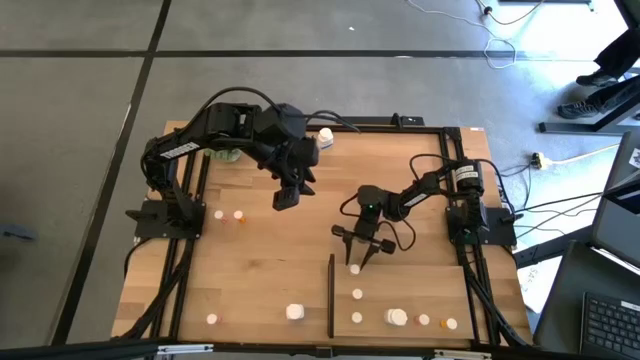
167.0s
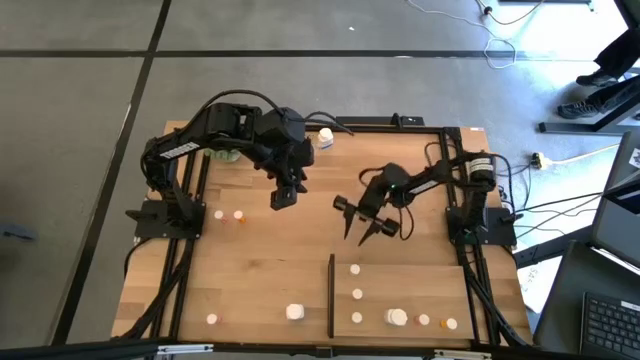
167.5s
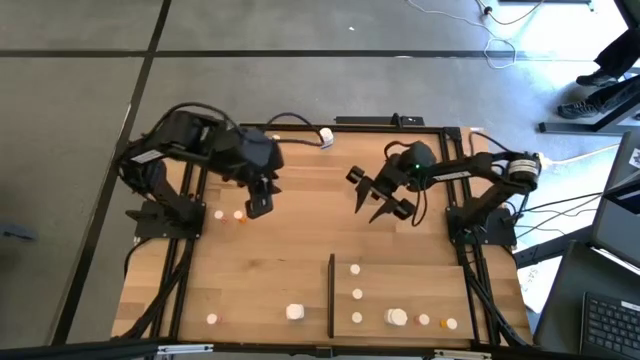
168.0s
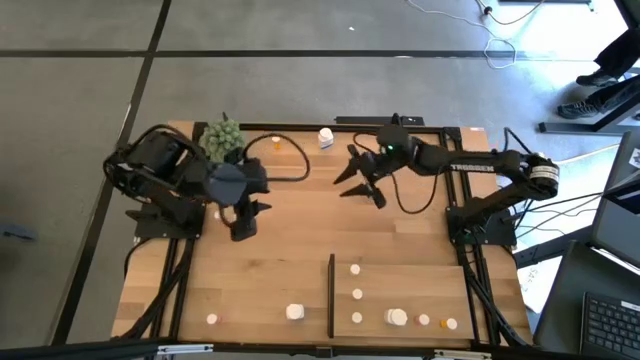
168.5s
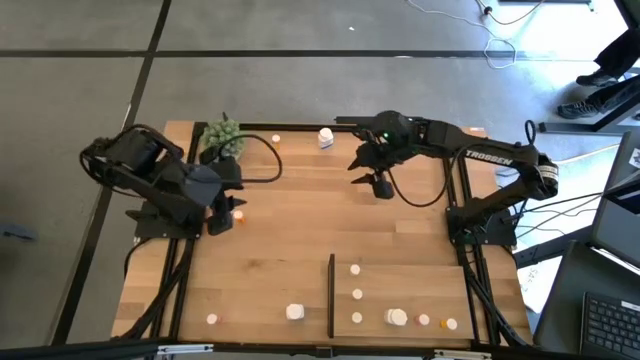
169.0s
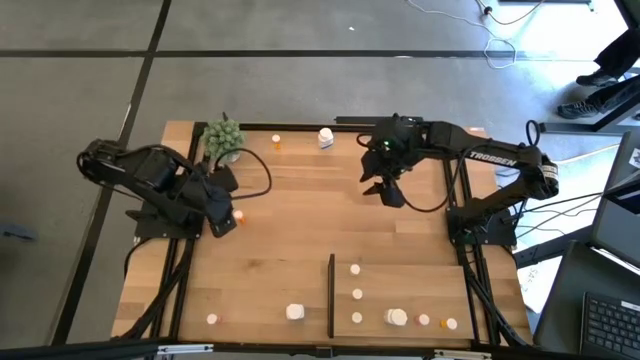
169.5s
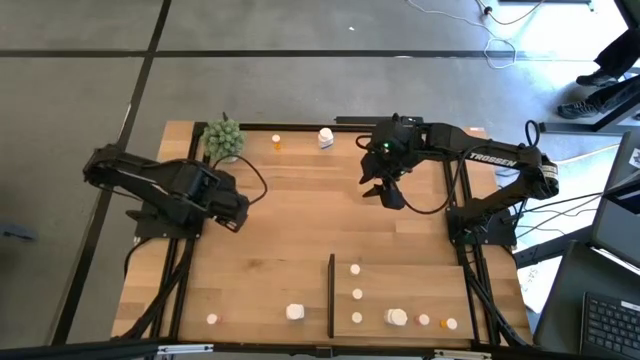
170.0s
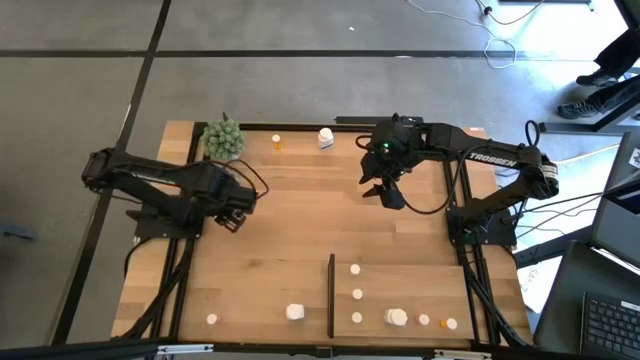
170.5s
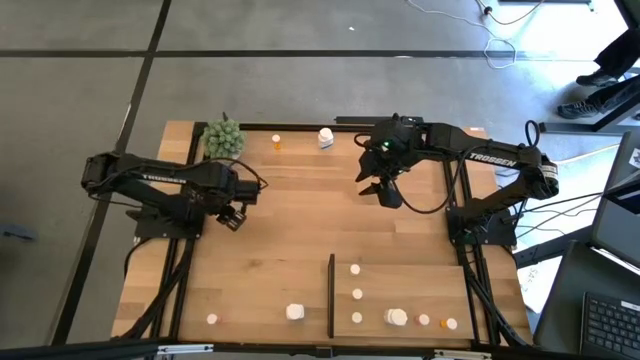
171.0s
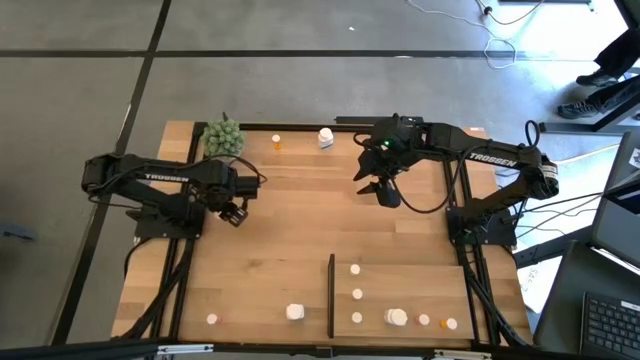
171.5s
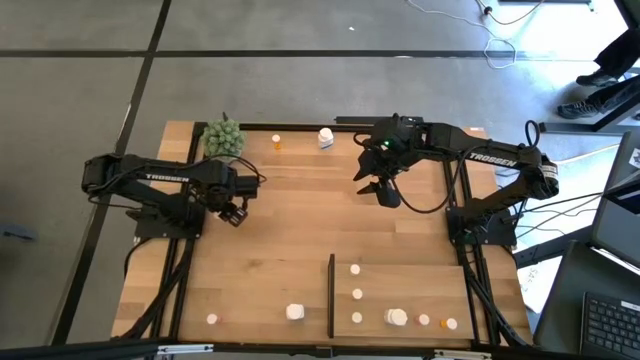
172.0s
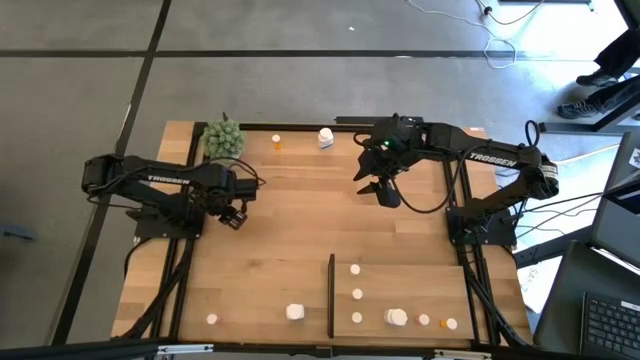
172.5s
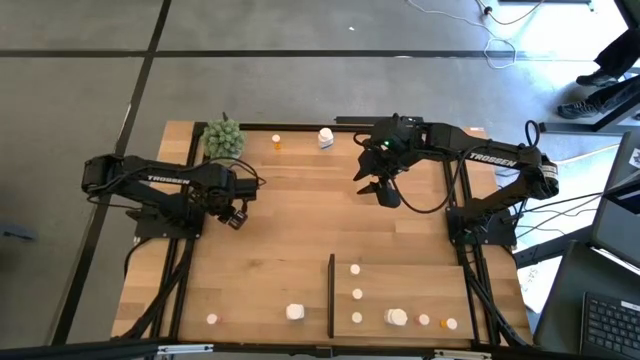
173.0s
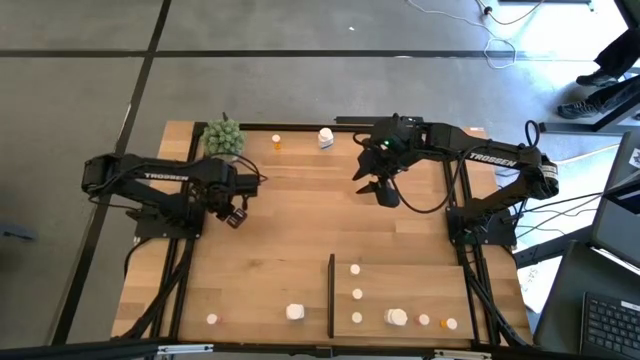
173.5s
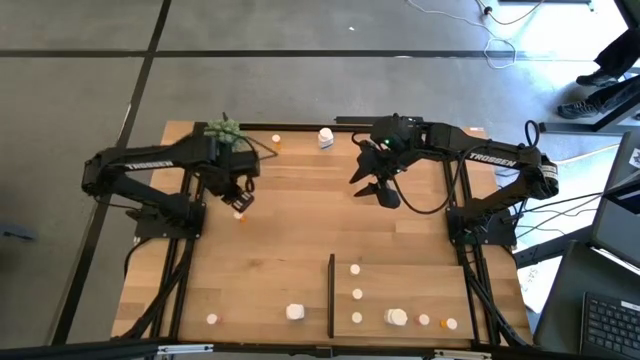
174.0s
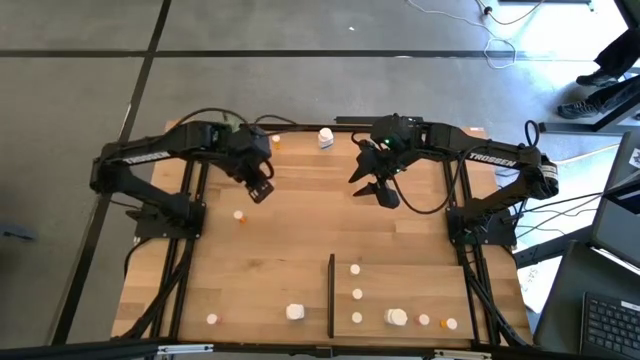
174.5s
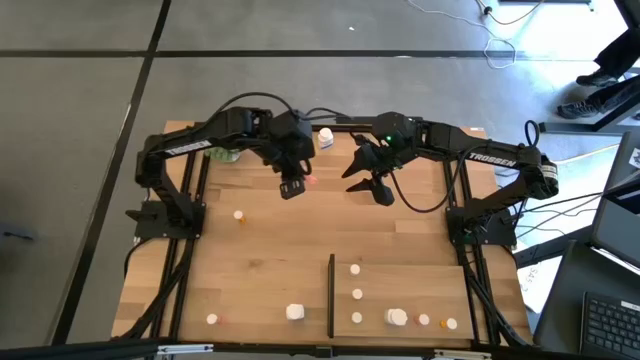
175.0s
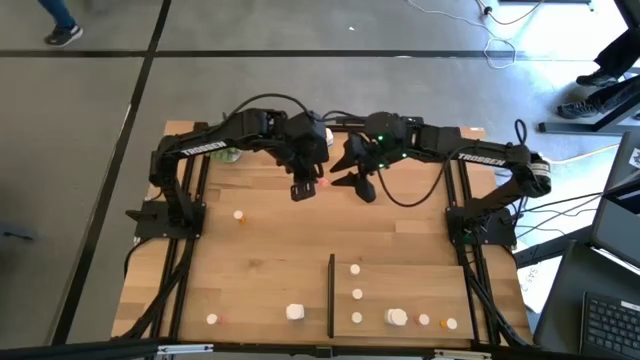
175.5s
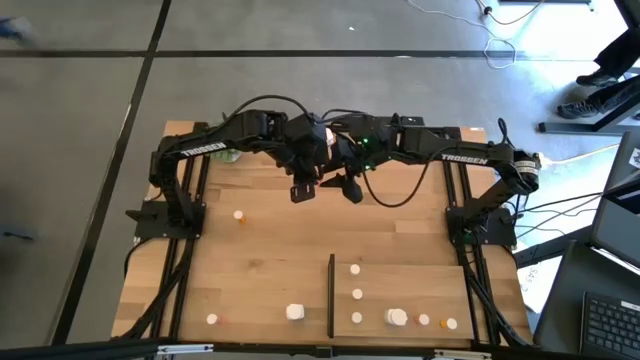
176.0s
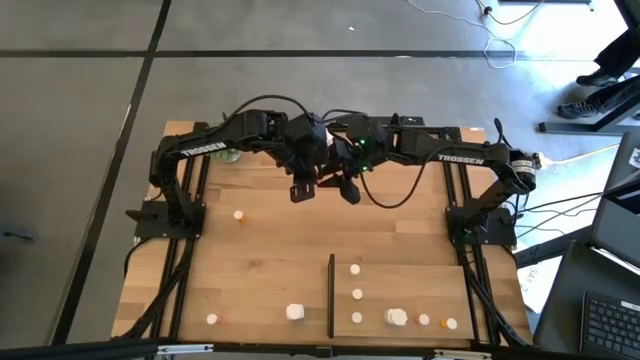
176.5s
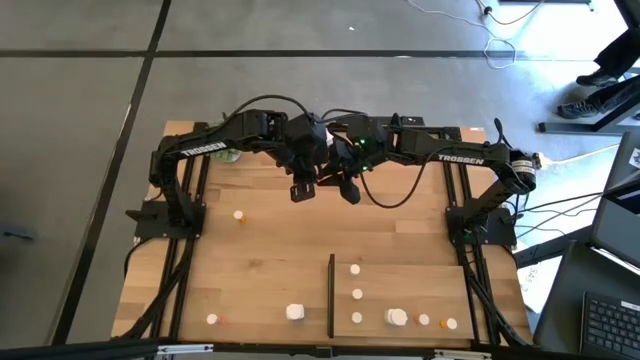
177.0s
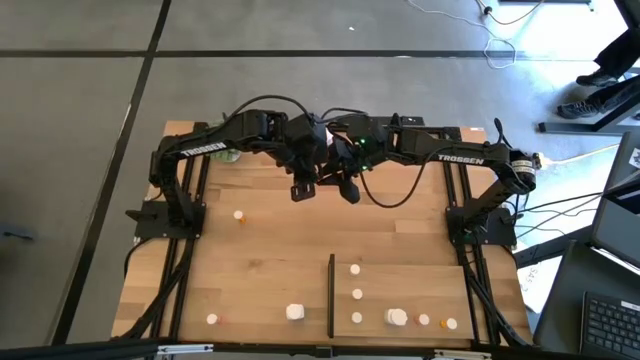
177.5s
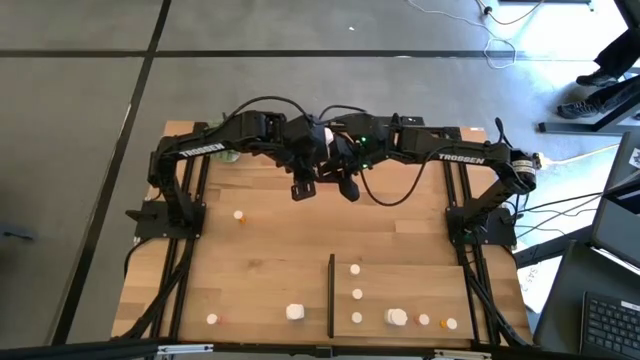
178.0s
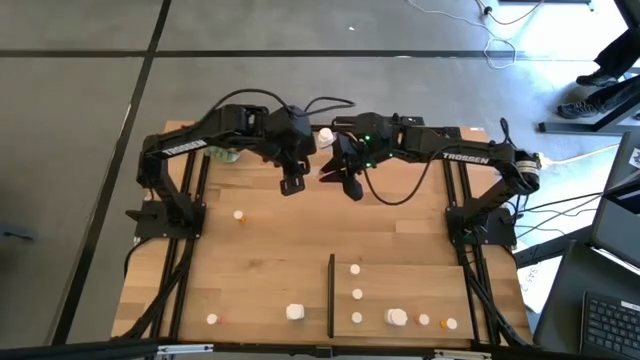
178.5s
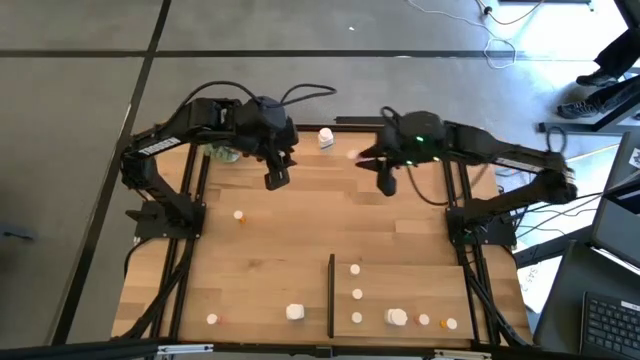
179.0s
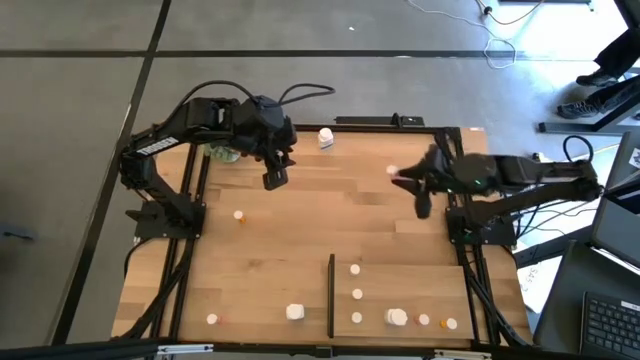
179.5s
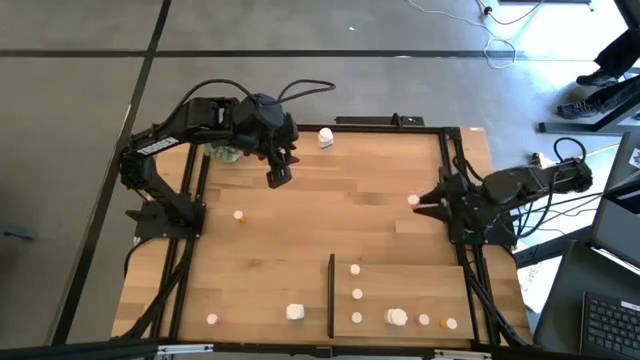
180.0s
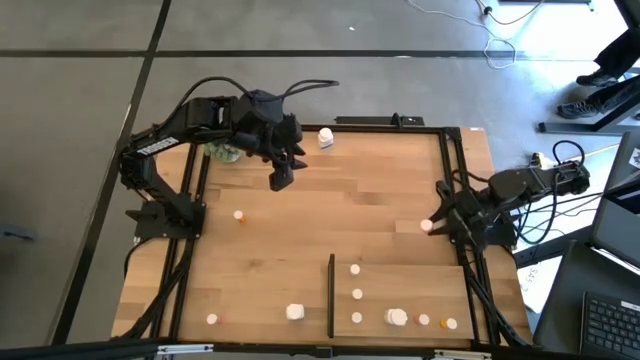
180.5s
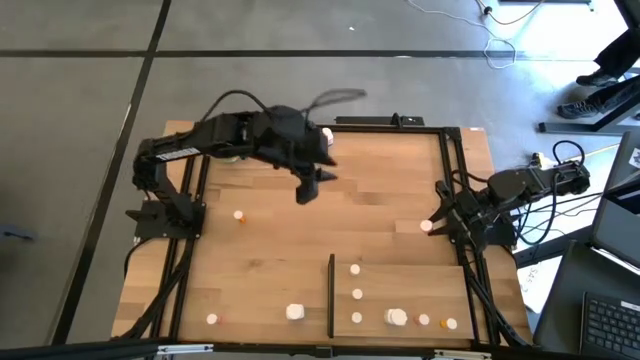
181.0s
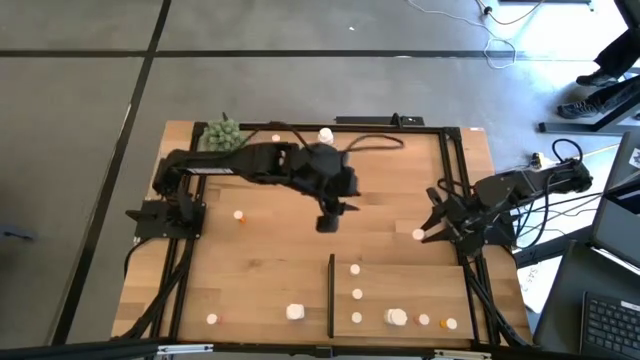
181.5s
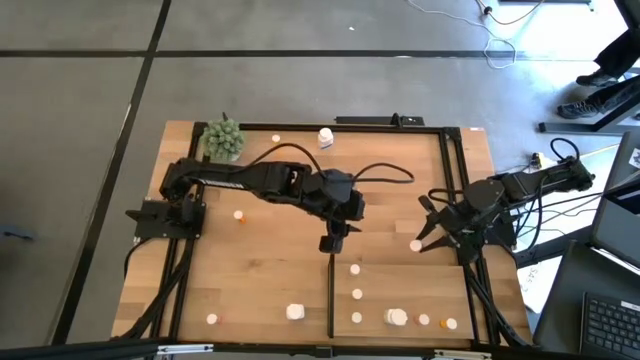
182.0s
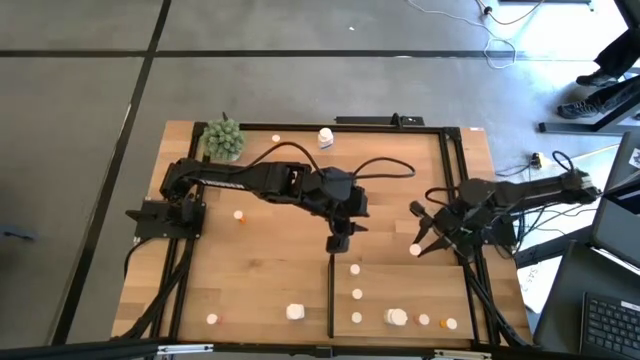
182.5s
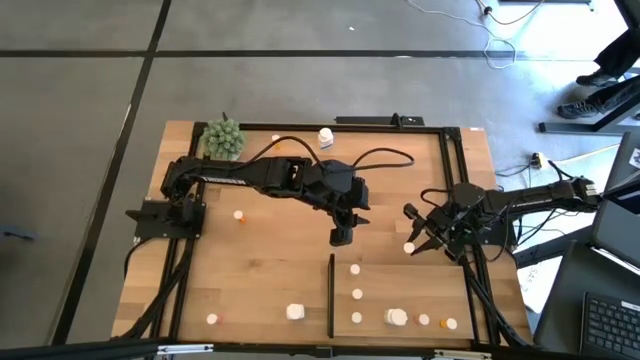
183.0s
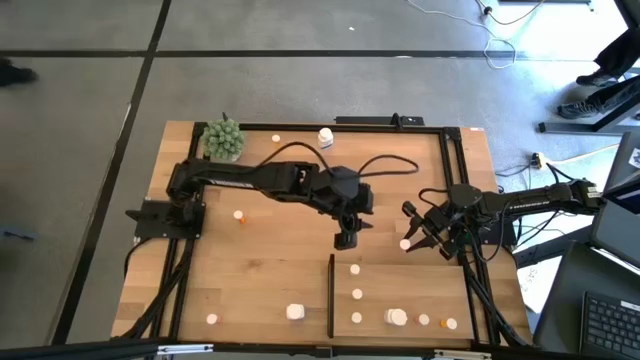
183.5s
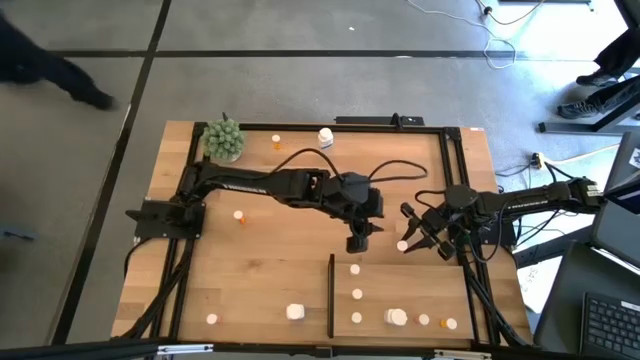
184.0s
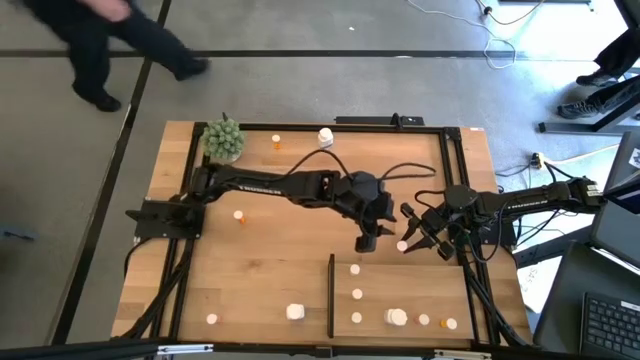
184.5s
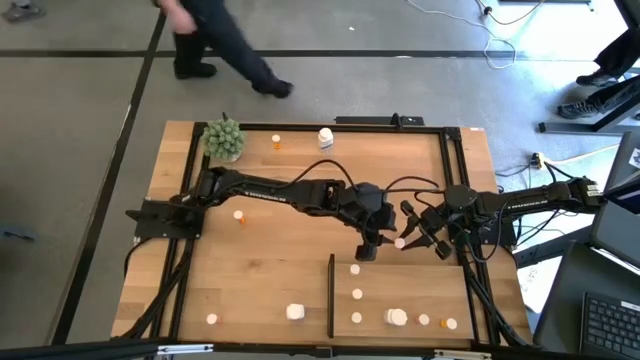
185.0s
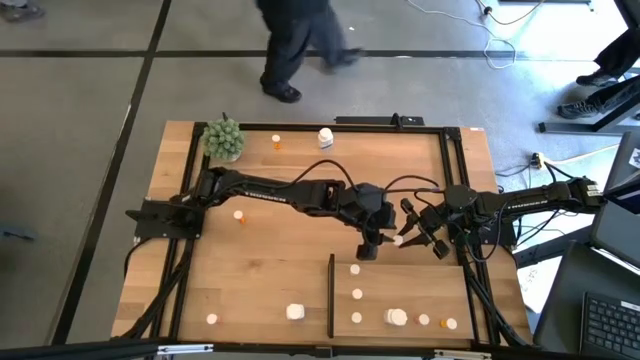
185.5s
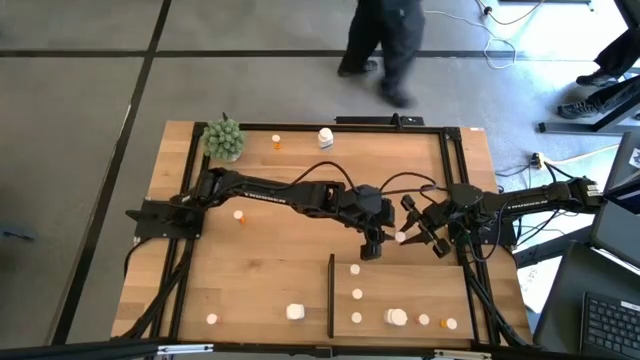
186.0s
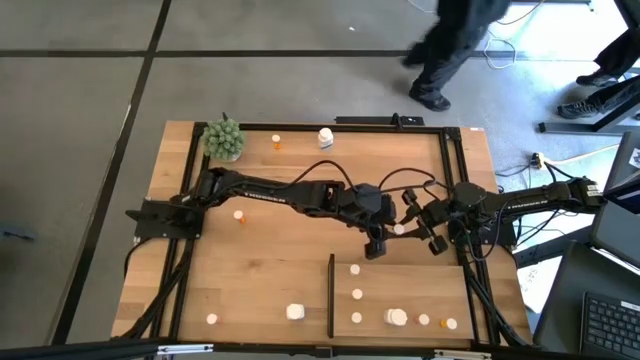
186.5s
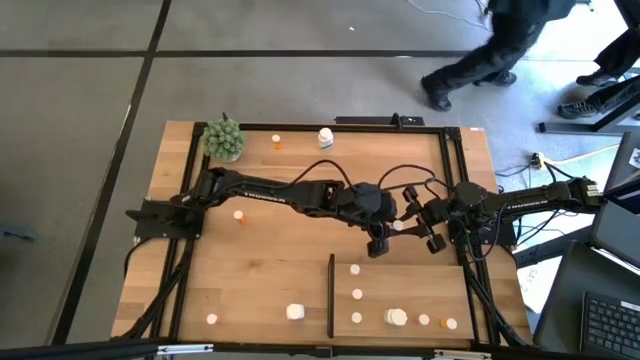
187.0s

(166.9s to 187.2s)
Task: Pick and place medicine bottles onto shelf by color
Put the top pink pill bottle on the shelf aligned with the other pink pill bottle

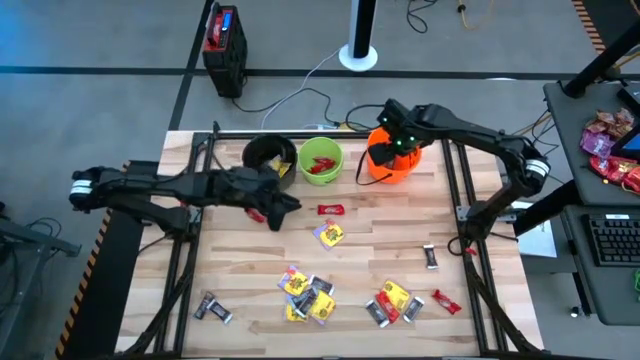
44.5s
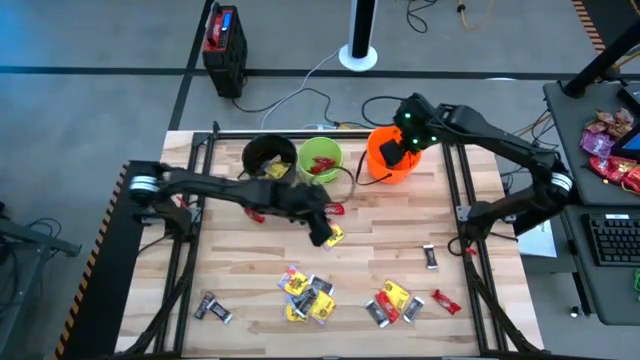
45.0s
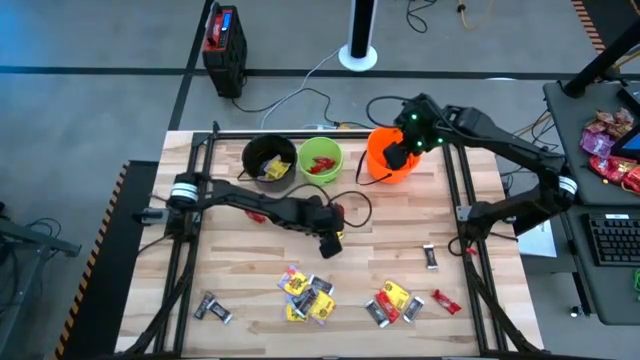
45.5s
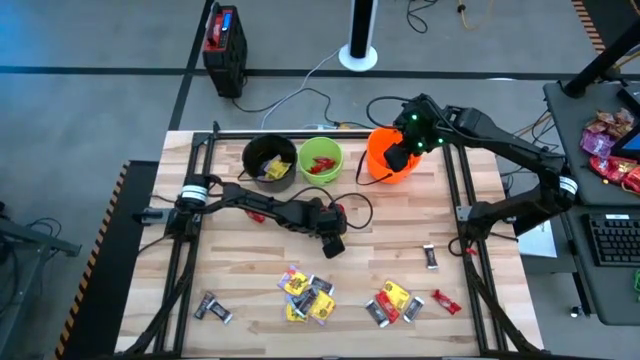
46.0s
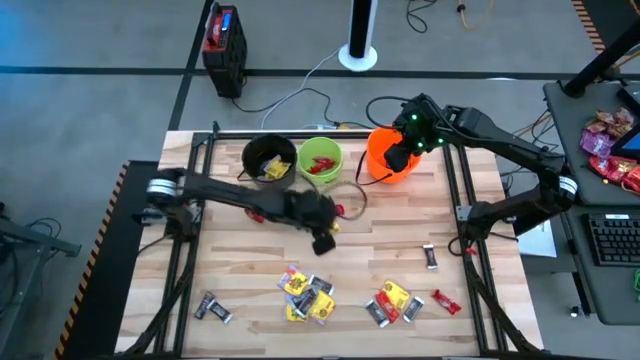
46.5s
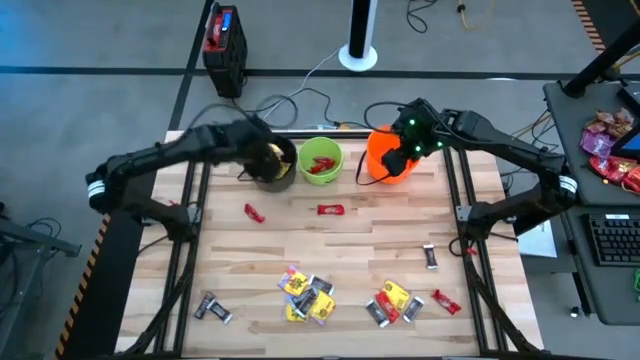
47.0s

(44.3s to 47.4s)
Task: Sort candy by brand, put in halloween buckets
Put the yellow candy into the black bucket

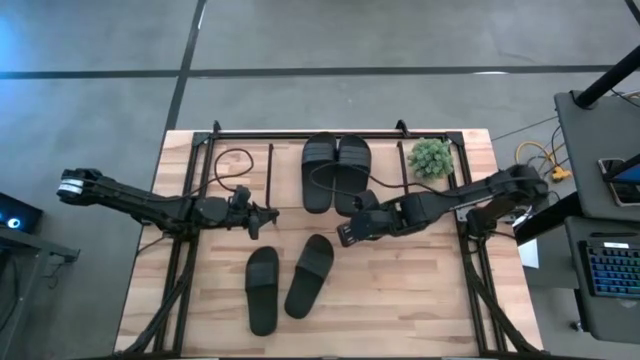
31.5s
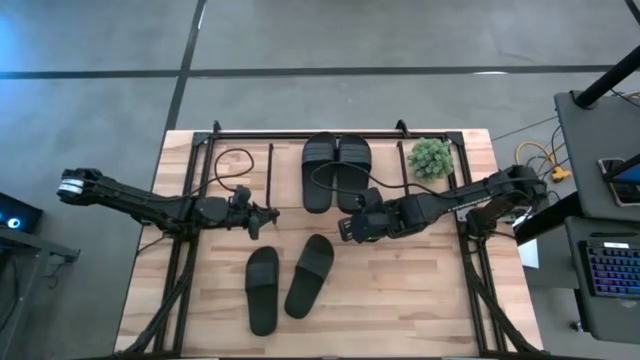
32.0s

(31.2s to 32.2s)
Task: Pick and place slides into the shelf
Adjust the black slide on the shelf
